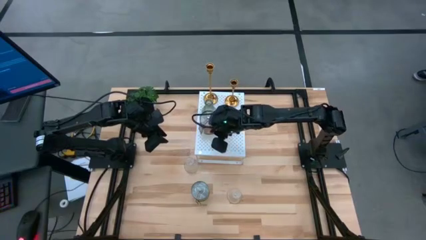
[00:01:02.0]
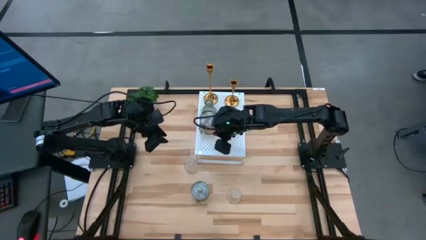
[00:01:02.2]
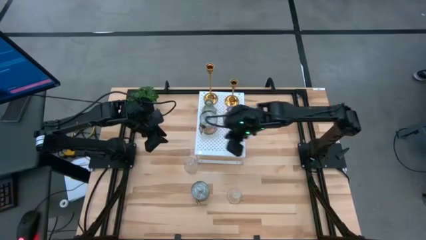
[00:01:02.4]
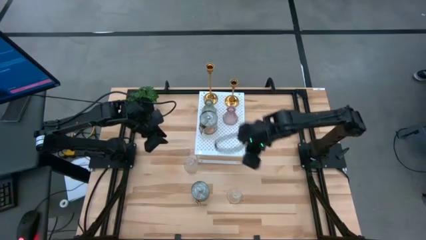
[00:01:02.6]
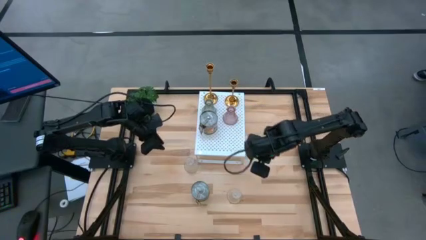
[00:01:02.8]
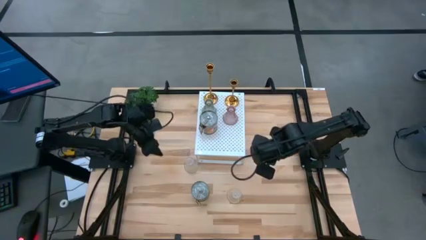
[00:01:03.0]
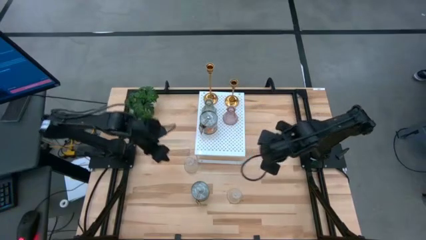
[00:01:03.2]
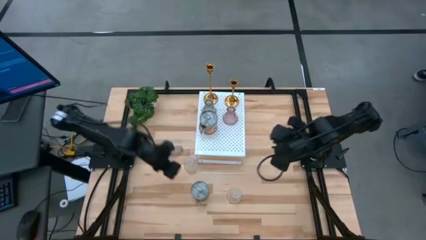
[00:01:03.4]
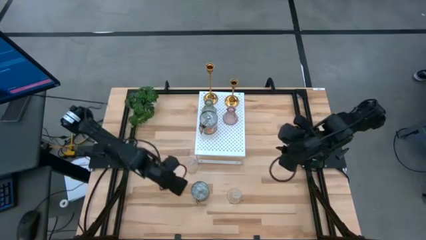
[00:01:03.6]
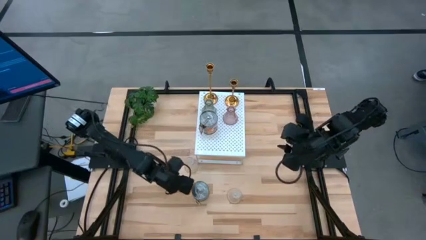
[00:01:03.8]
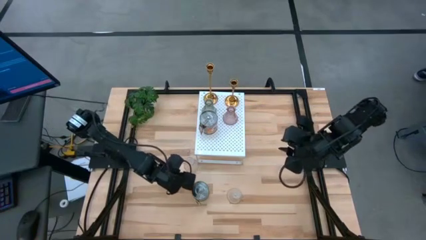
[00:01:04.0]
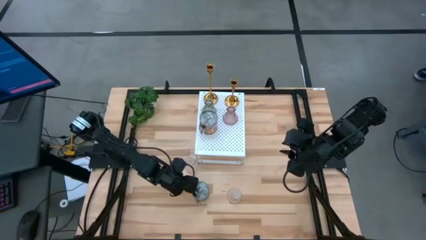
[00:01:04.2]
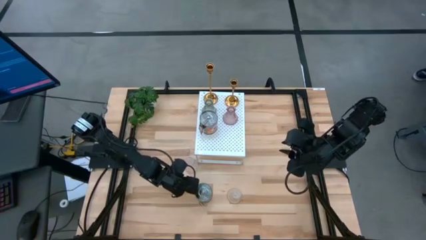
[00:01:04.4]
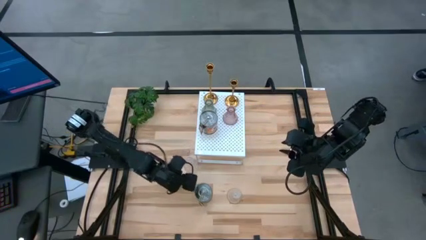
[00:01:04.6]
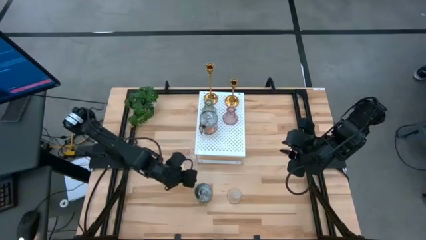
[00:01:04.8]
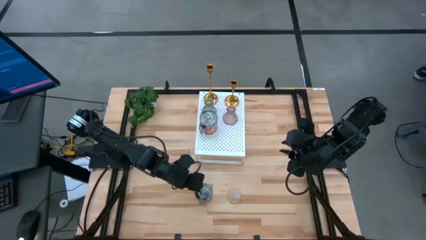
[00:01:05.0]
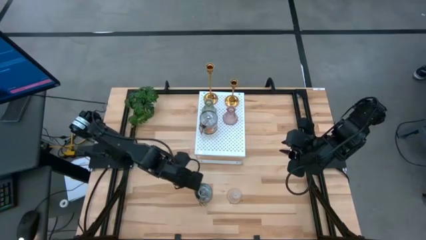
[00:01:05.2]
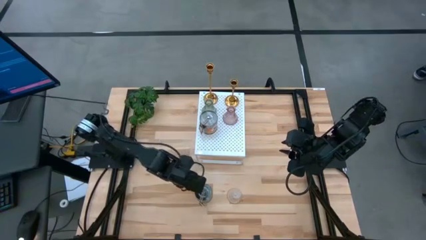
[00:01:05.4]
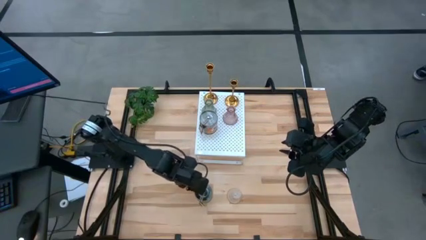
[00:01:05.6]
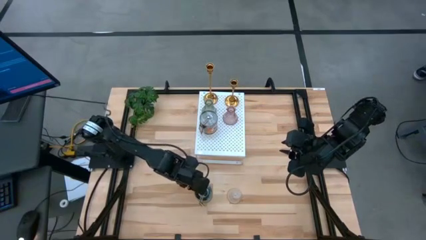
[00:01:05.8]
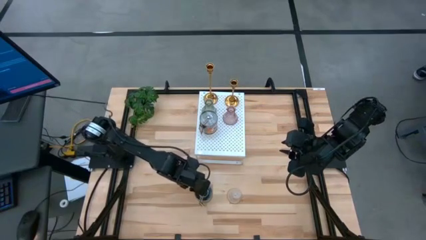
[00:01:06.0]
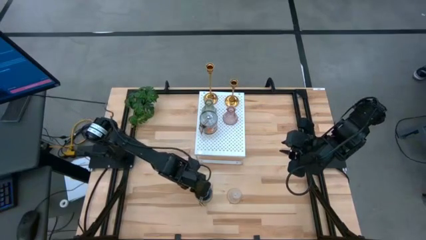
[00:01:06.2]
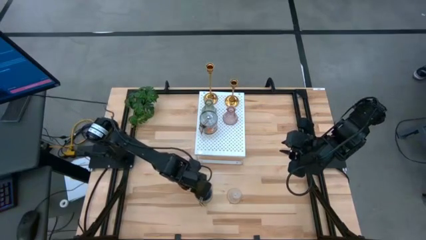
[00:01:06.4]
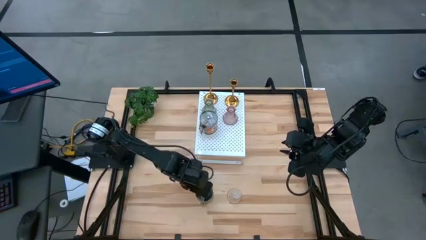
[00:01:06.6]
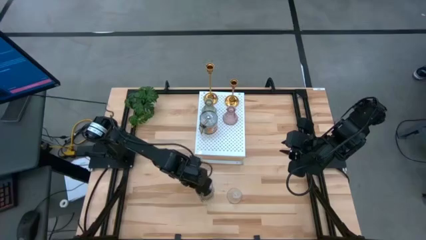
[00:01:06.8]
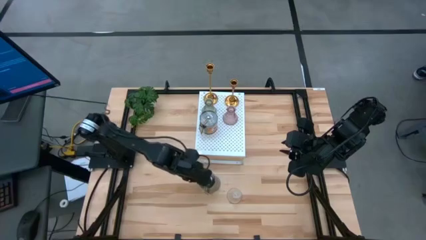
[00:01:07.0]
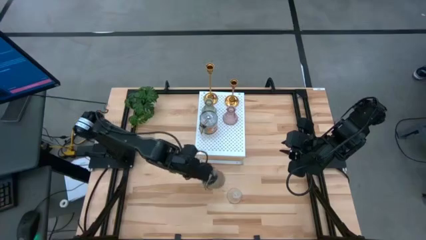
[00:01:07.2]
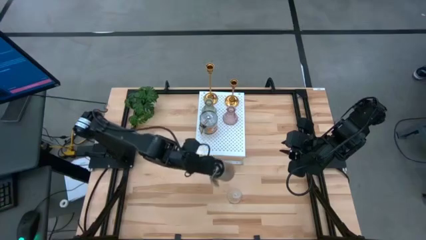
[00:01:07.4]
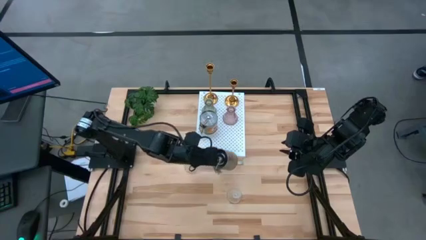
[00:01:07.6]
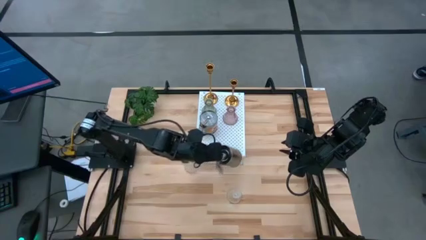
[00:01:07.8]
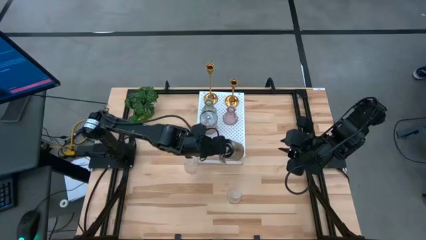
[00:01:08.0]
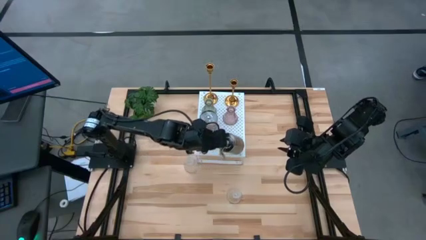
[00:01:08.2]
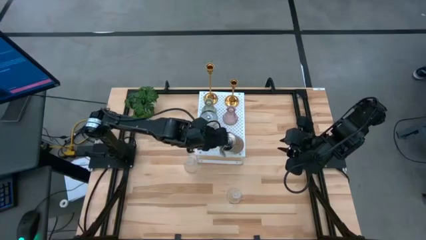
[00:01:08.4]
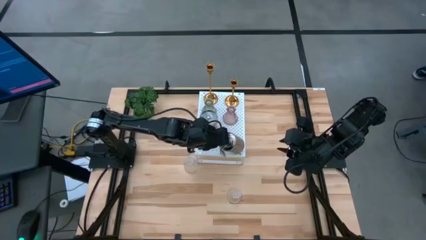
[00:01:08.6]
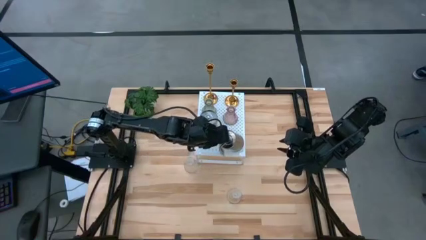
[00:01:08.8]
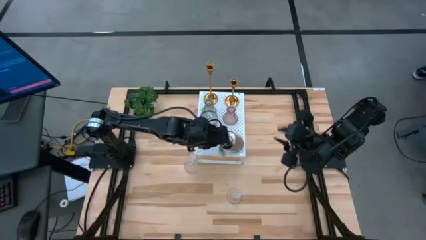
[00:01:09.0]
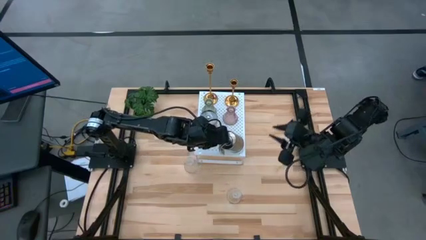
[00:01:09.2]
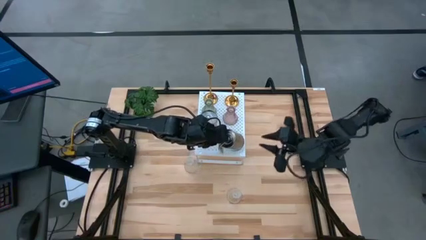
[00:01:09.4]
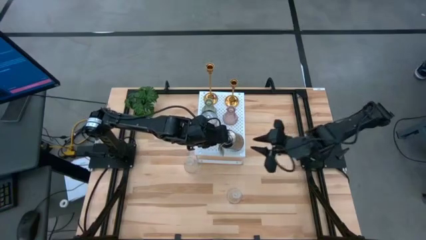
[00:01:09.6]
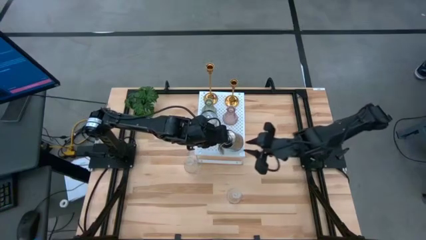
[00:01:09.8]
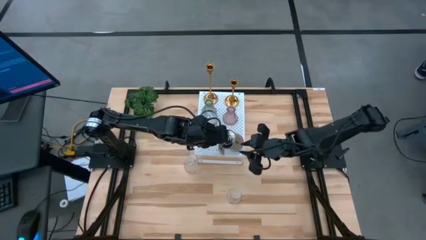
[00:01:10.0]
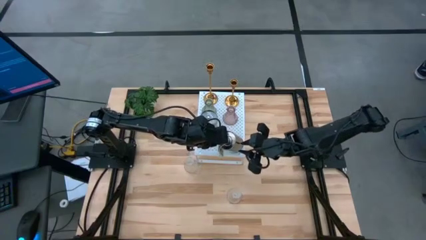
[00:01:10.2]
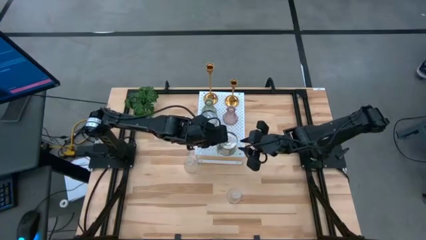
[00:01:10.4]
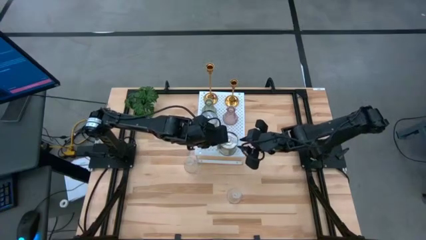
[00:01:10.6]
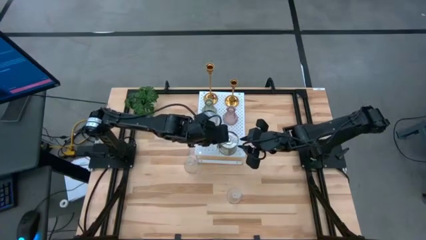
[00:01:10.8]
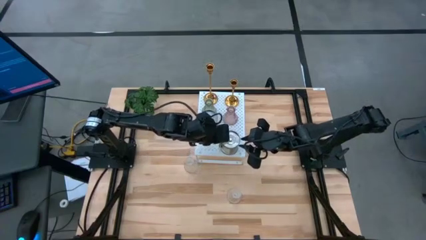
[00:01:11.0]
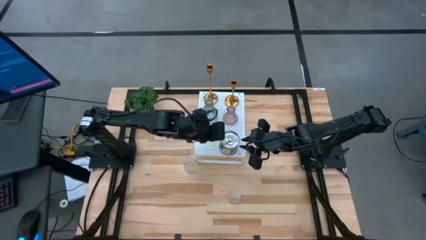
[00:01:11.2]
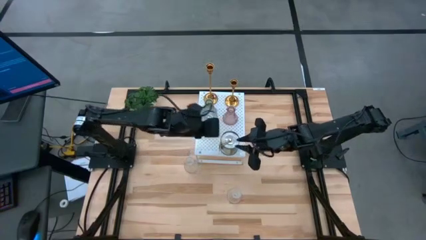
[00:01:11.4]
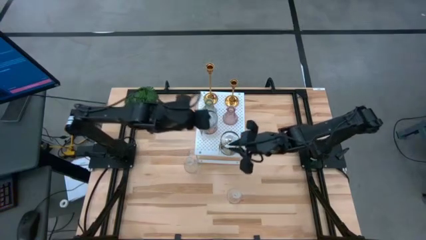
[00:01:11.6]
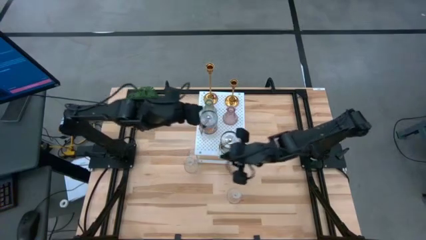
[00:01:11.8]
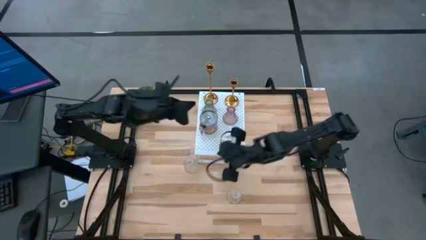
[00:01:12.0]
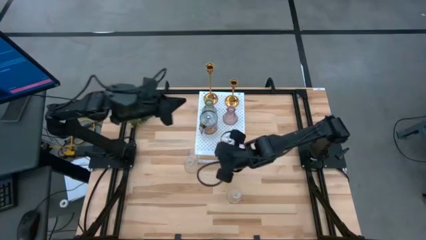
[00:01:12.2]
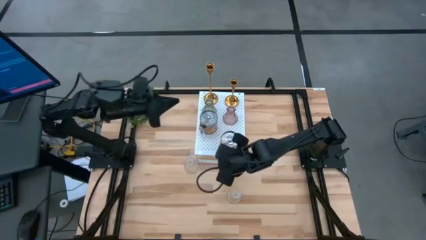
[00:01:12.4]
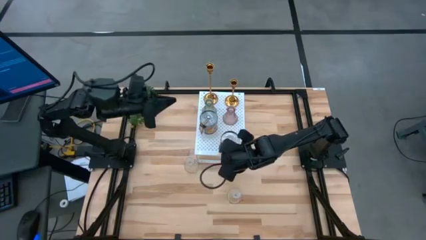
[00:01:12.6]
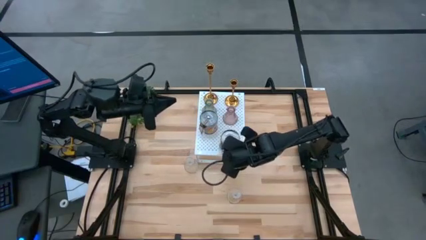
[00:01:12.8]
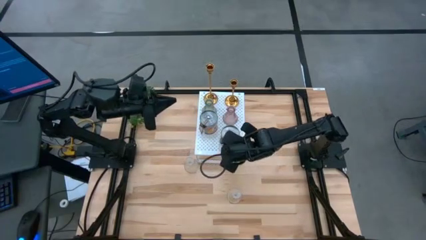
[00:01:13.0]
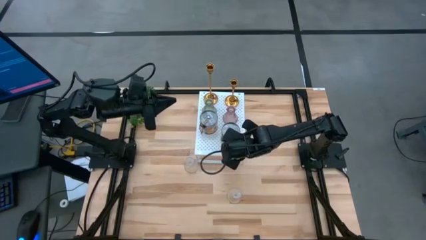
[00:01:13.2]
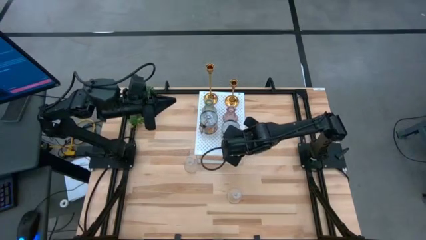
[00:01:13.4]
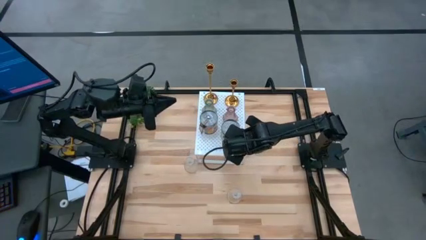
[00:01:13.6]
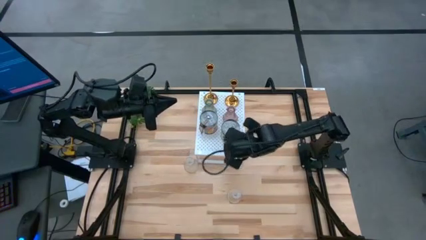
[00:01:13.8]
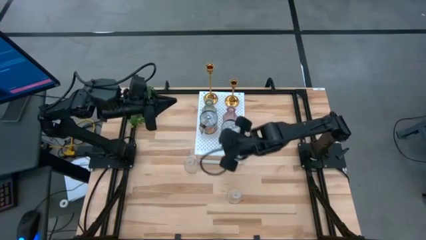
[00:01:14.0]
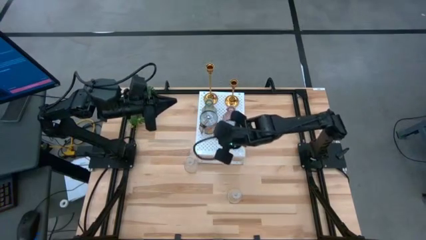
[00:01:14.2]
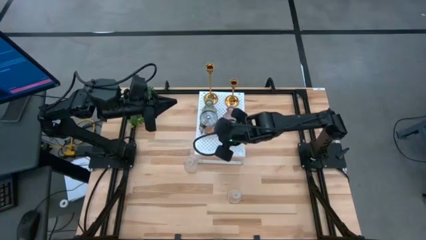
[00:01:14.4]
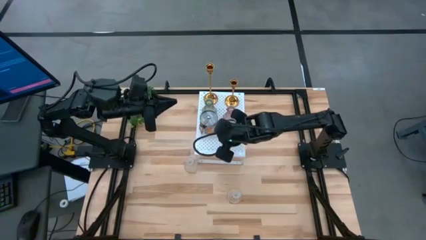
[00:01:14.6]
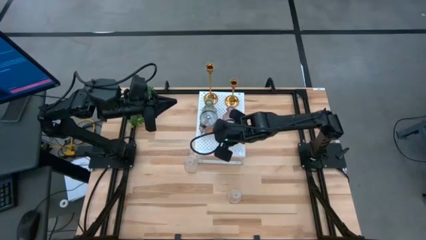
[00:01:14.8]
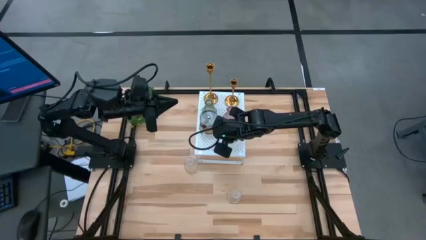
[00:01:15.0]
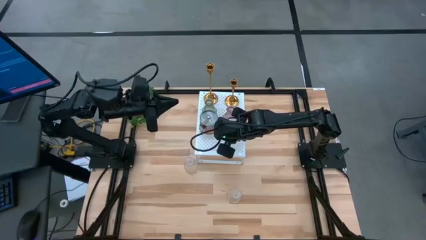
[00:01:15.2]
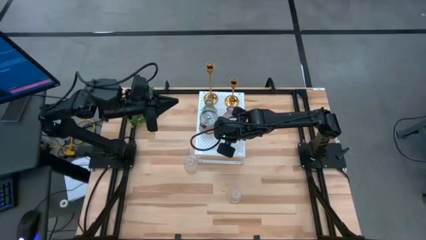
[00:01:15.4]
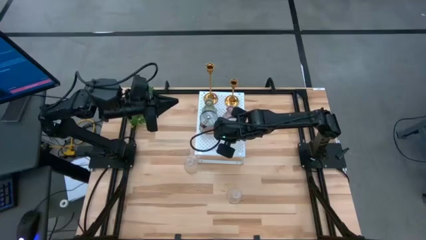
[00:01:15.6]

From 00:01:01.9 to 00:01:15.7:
Task: Pick & Place candle stick holders
Put the silver scented candle on the shelf
